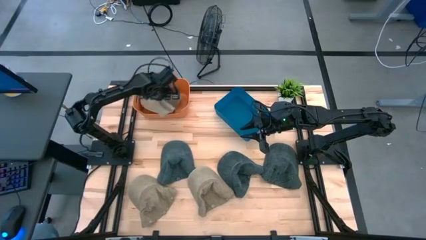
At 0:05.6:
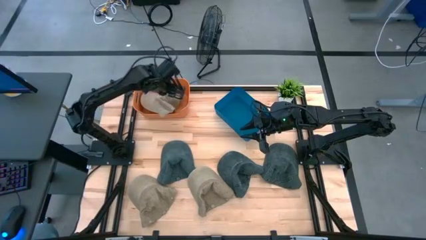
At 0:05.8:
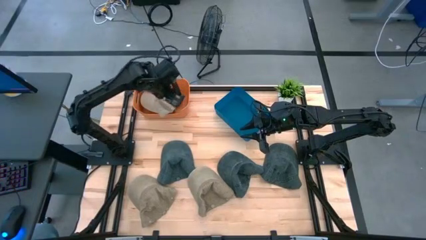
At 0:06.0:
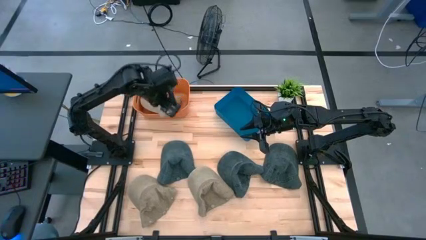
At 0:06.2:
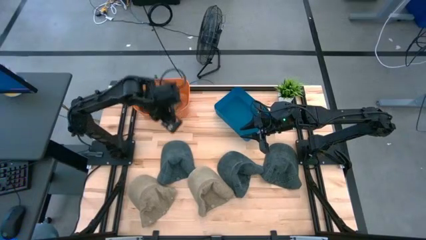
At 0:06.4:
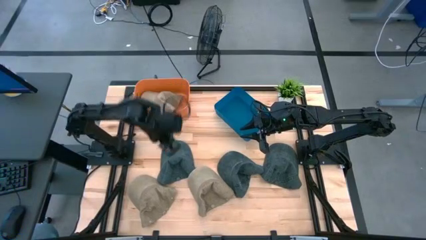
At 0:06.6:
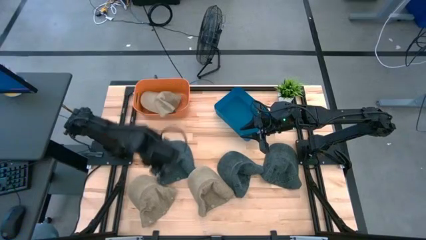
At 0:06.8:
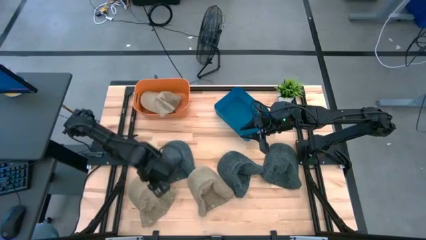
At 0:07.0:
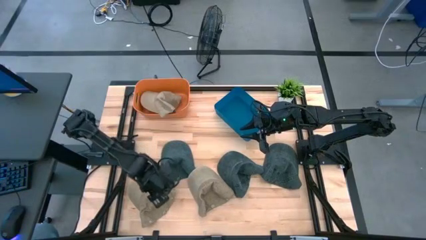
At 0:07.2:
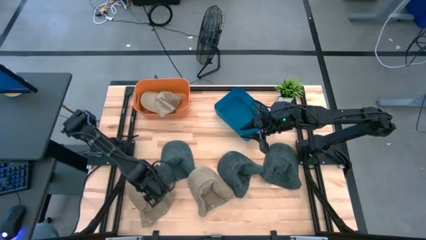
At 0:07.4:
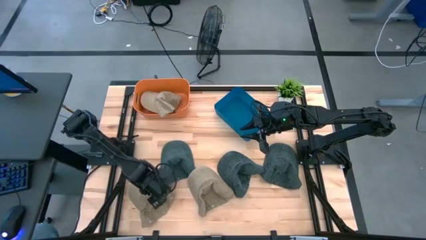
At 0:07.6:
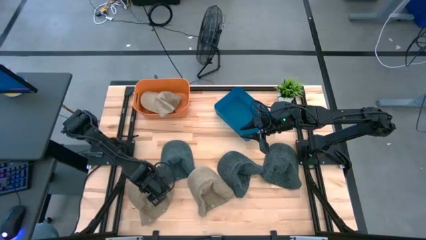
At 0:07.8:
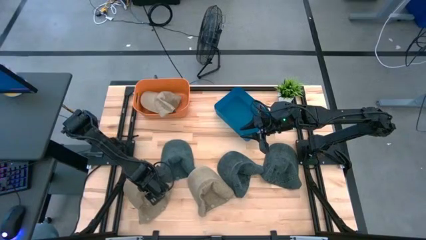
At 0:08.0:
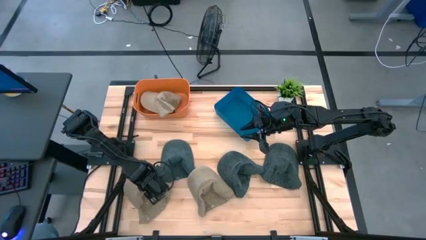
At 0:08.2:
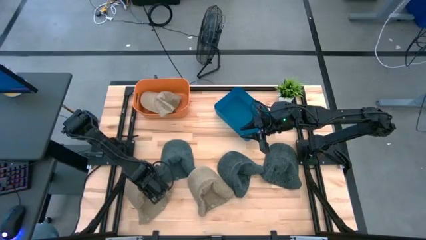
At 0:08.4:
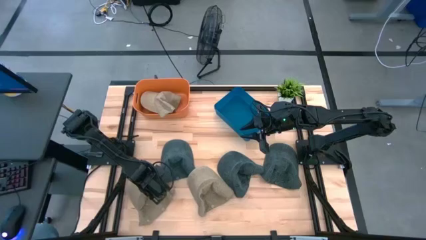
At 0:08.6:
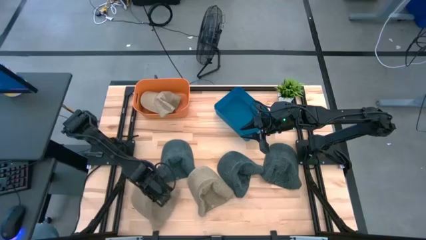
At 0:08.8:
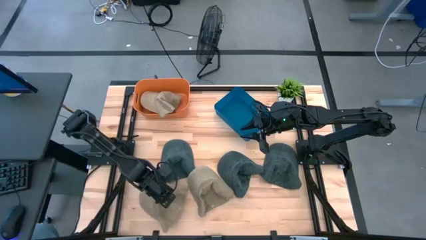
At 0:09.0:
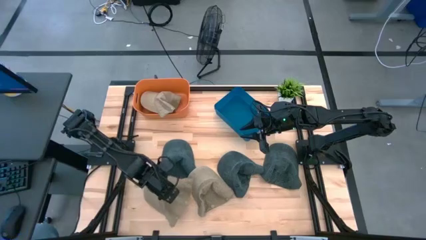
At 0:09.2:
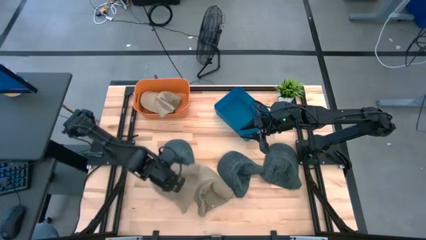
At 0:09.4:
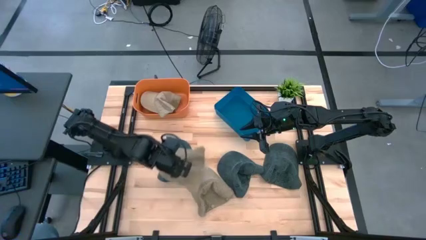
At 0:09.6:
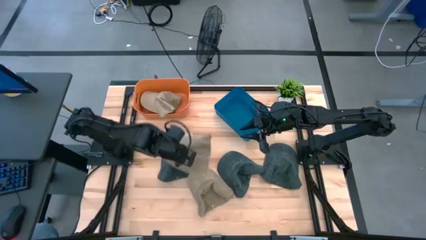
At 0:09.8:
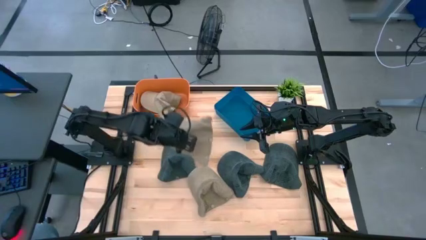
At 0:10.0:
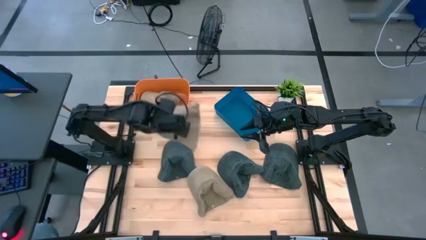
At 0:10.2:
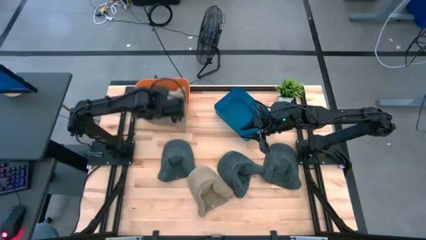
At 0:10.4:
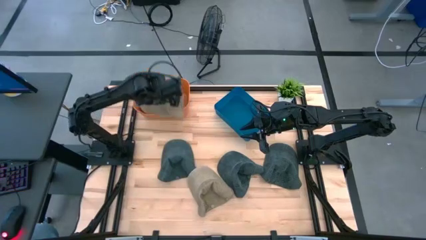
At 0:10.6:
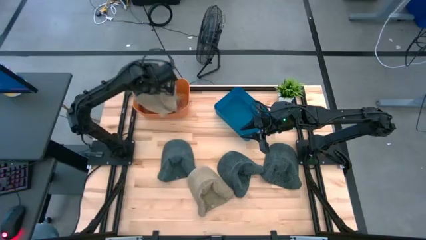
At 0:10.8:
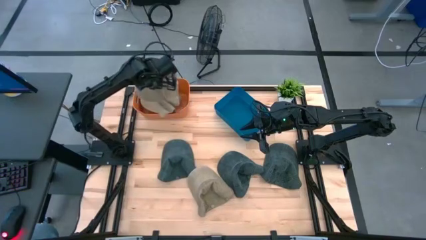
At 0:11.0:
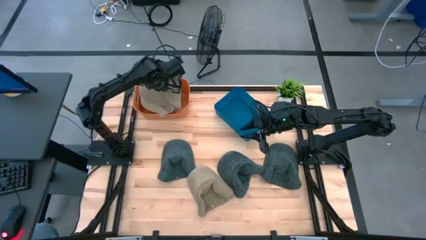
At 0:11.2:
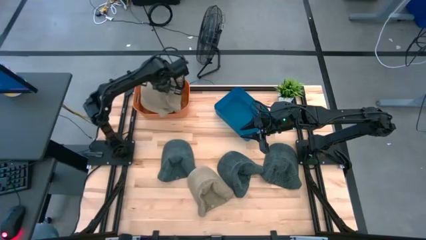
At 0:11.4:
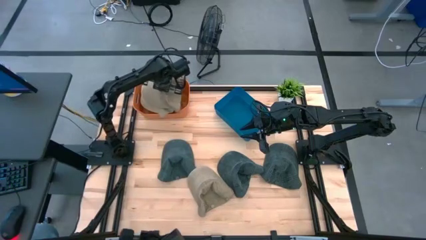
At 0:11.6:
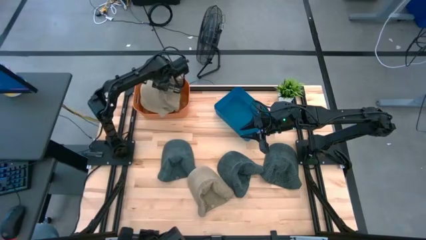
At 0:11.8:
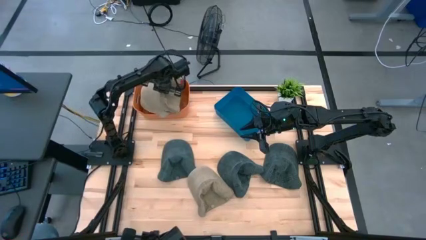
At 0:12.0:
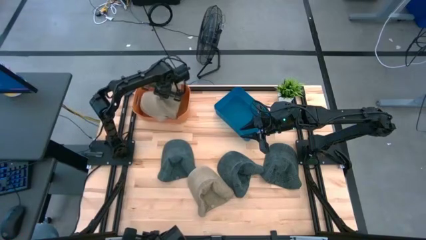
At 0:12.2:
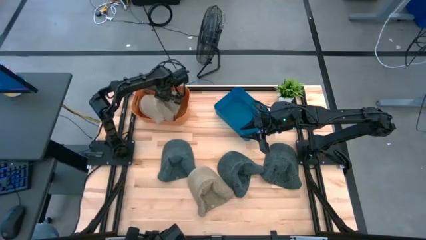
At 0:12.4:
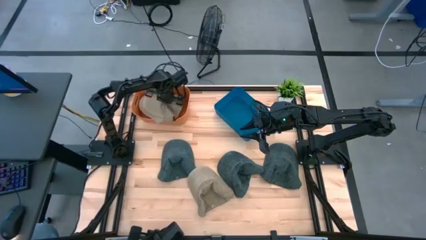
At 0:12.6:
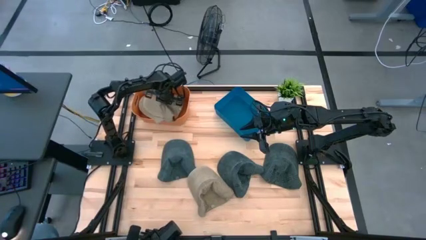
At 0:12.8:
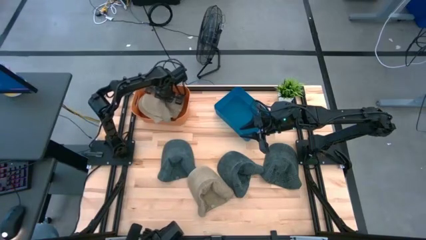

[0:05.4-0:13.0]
Task: Pick & Place hat
Put the left brown cap into the orange bin

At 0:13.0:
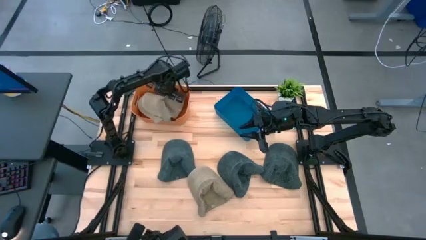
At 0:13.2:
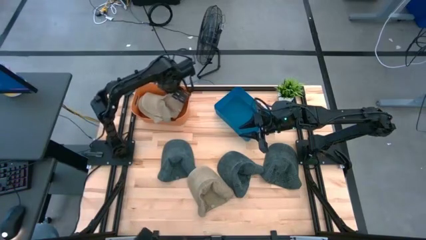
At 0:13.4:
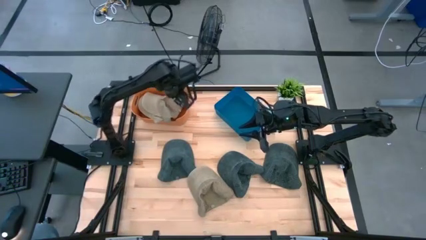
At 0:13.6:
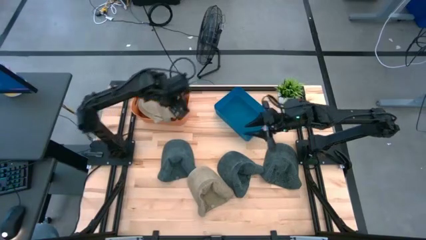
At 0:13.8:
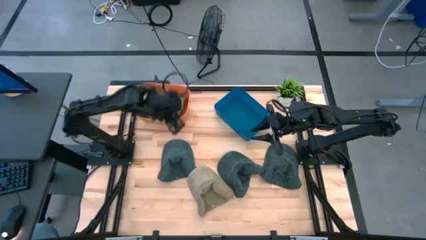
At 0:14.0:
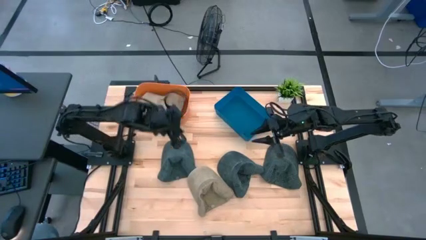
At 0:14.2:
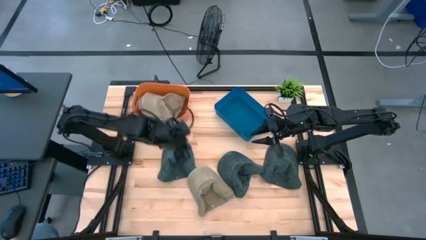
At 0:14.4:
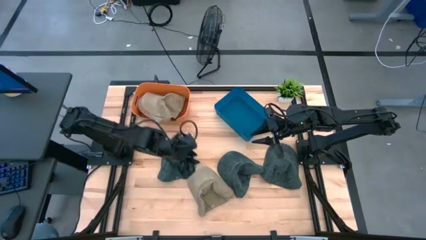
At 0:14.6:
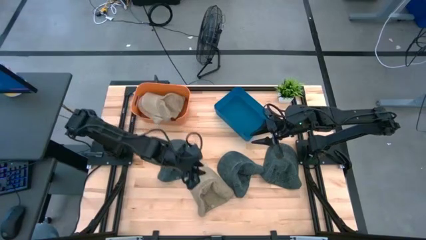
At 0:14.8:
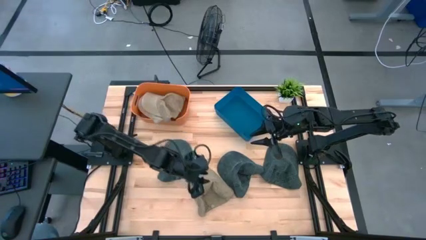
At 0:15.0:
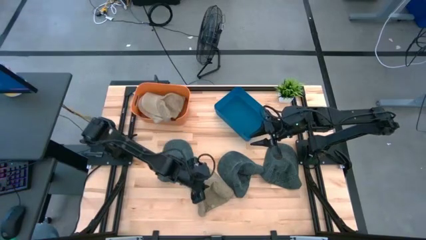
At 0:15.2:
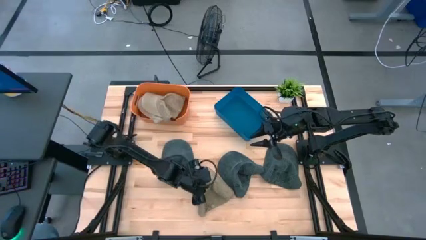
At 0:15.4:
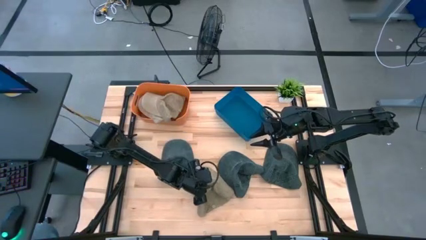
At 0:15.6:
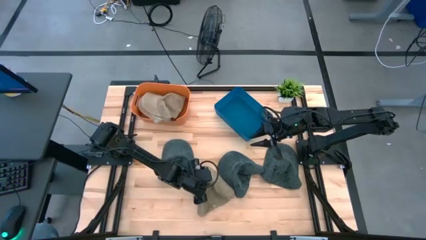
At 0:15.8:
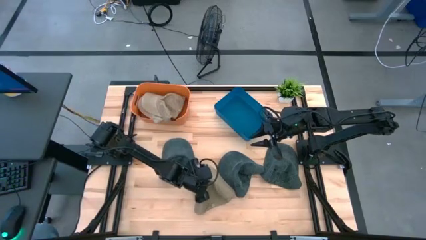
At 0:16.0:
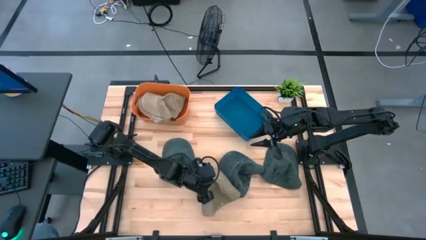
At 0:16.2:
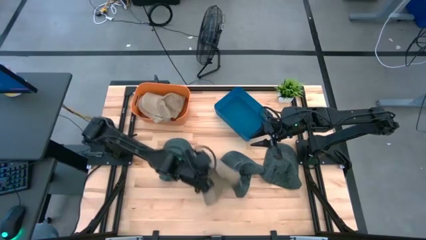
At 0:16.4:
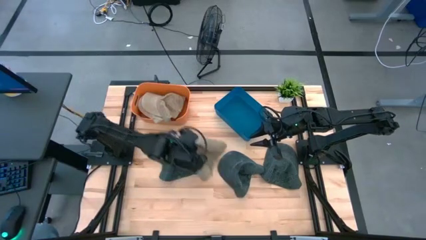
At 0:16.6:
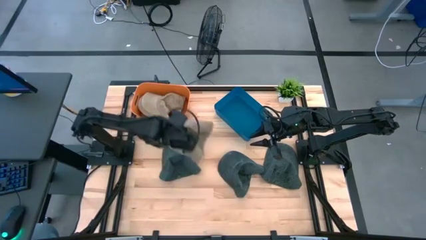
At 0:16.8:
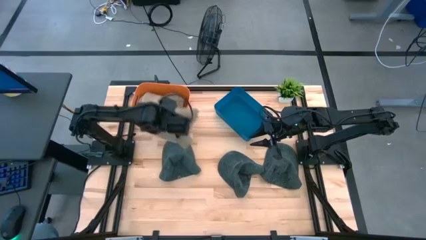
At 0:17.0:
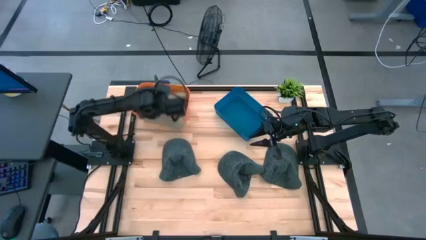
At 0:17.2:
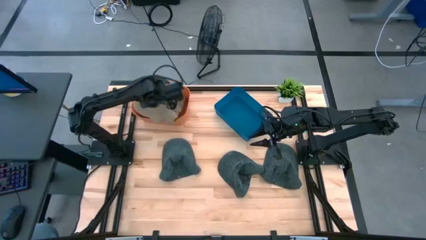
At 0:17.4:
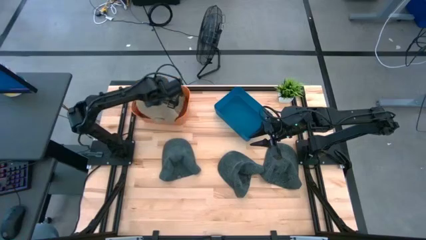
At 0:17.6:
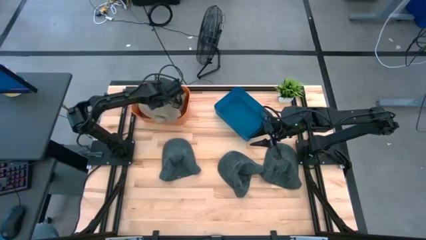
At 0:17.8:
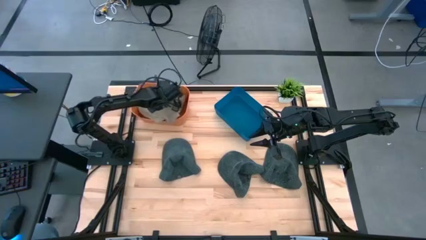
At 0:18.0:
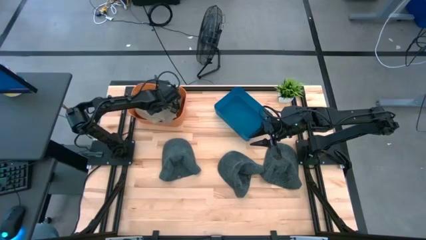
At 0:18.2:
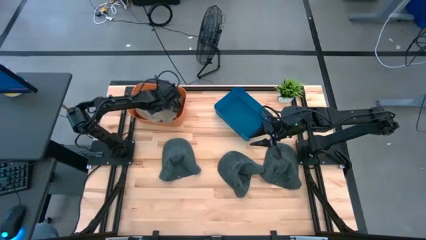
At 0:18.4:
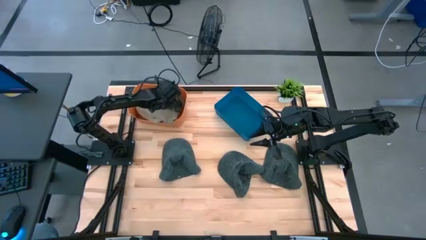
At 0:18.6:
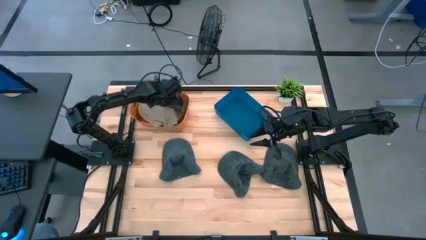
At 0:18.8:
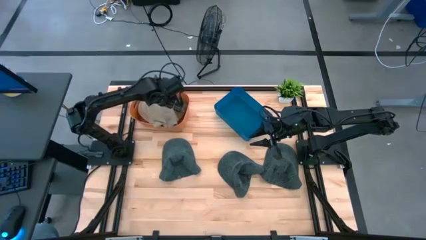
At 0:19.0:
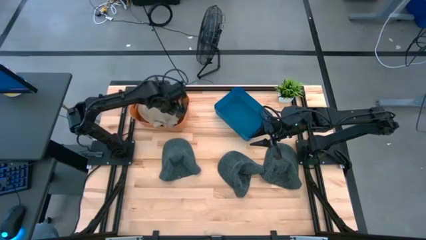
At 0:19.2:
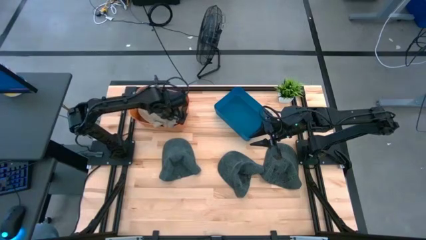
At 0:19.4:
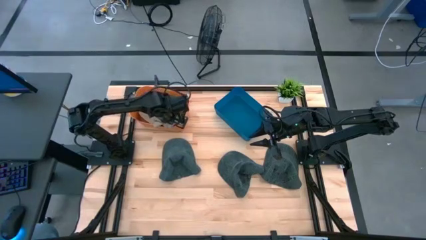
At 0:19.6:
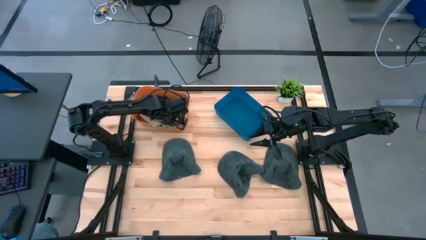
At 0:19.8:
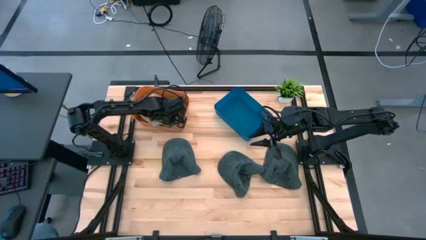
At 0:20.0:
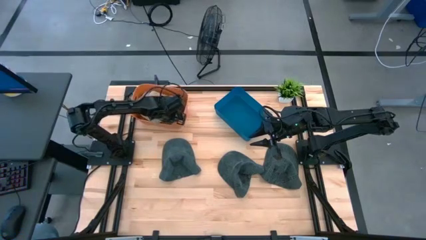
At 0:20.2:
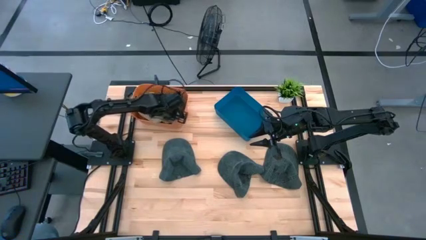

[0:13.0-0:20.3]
Put the brown cap into the orange bin
